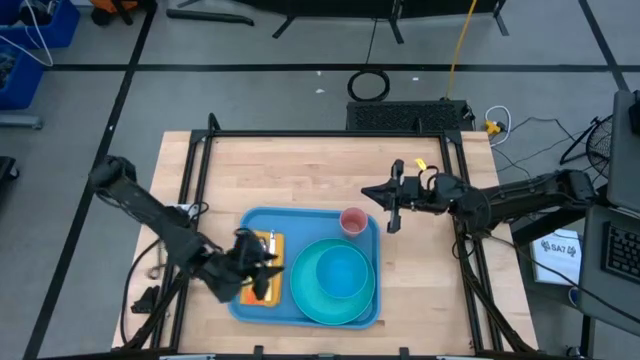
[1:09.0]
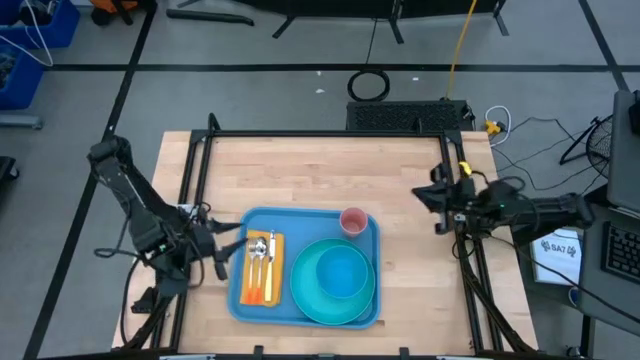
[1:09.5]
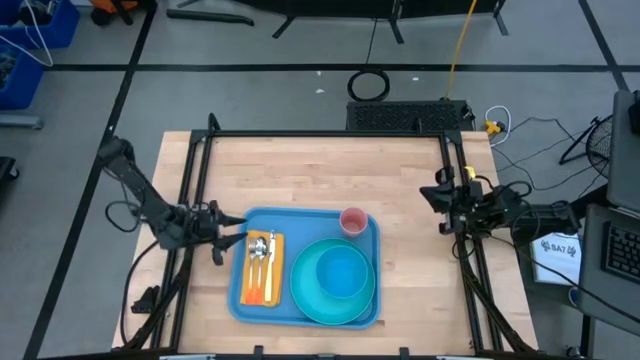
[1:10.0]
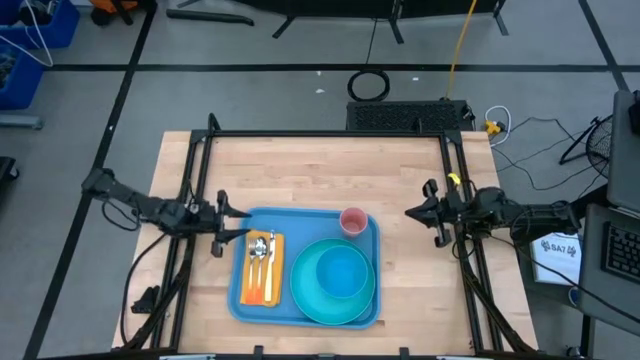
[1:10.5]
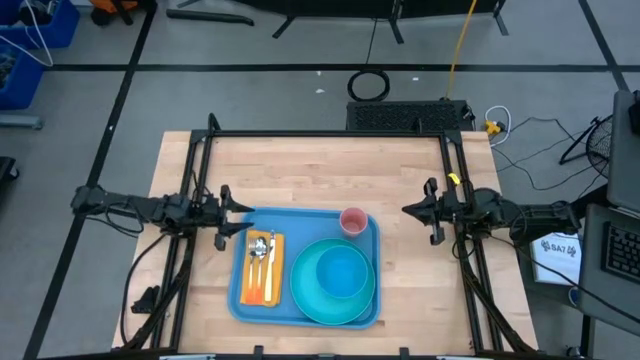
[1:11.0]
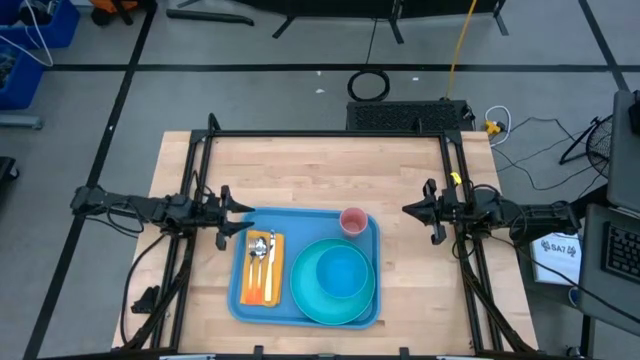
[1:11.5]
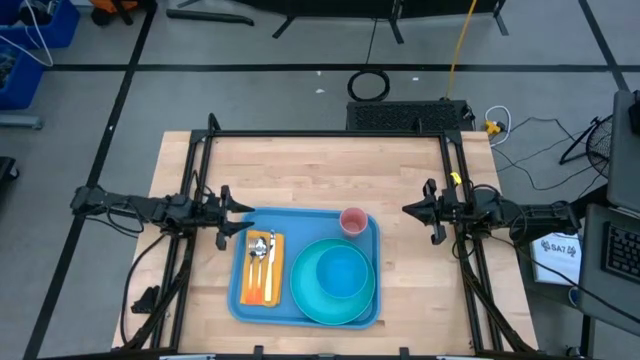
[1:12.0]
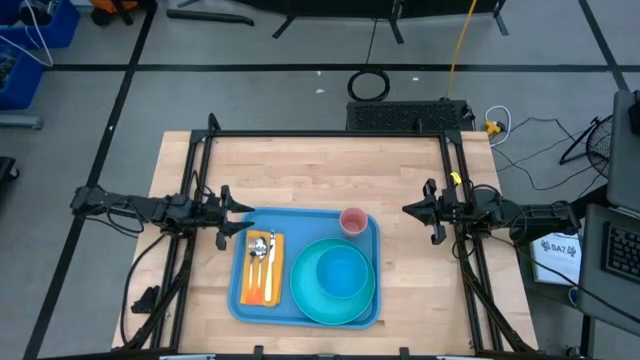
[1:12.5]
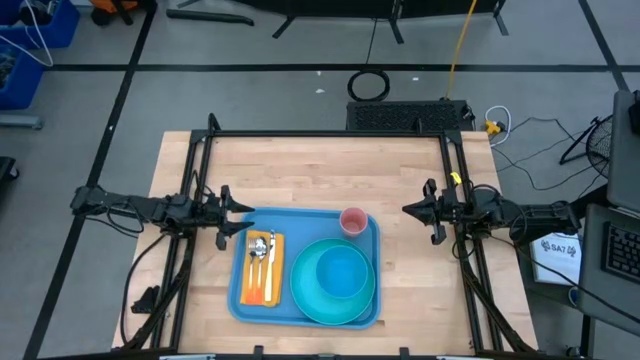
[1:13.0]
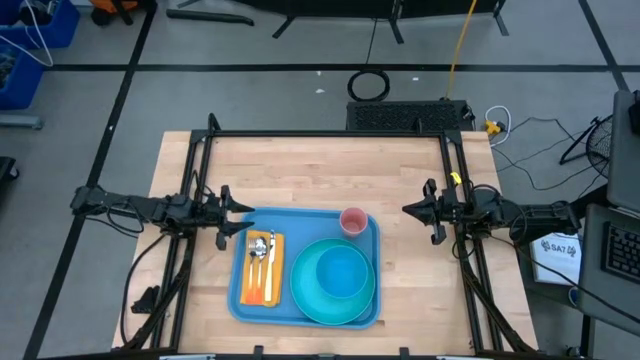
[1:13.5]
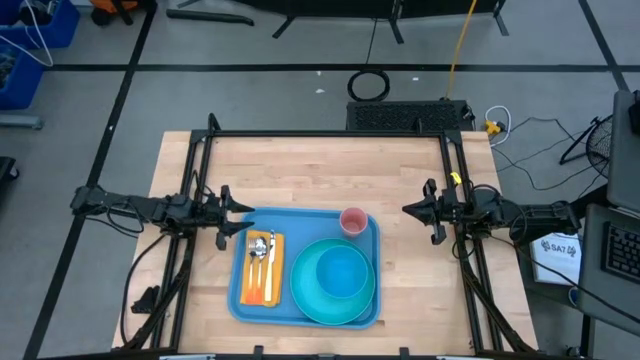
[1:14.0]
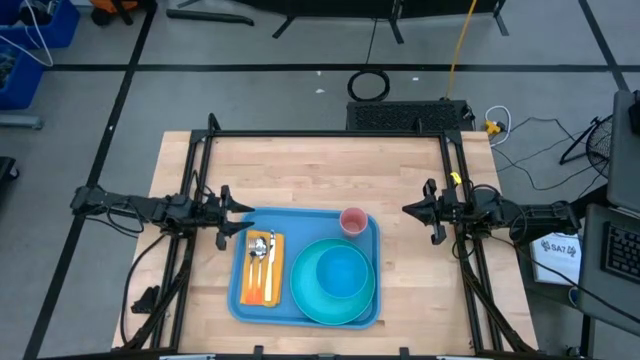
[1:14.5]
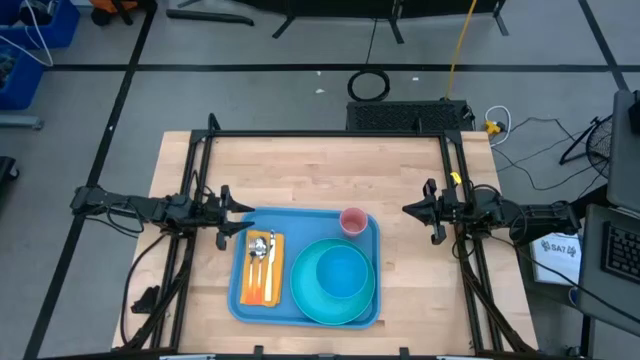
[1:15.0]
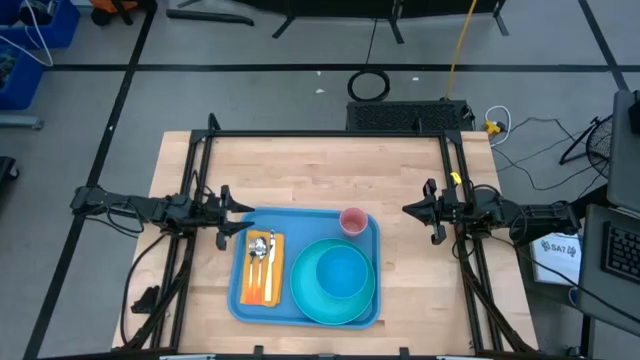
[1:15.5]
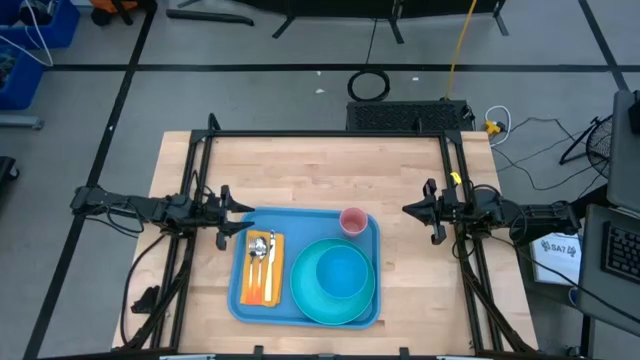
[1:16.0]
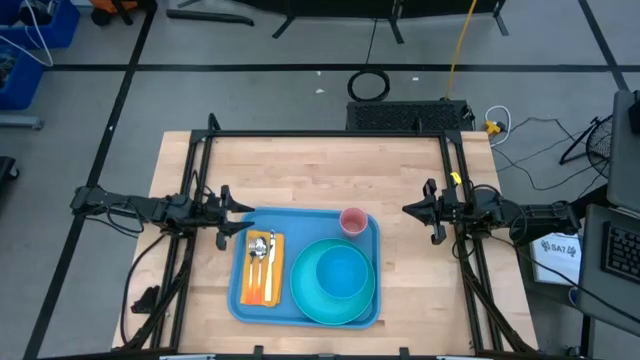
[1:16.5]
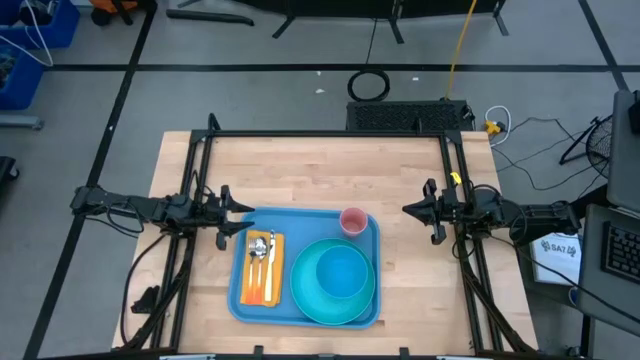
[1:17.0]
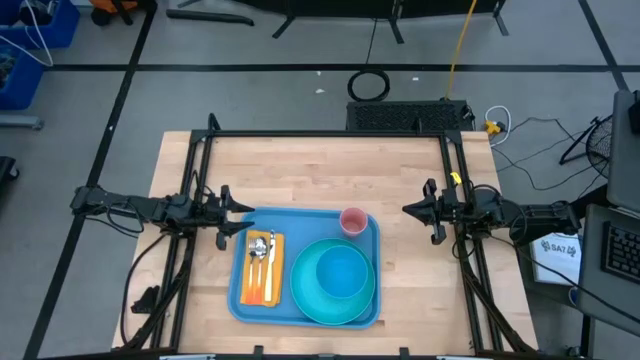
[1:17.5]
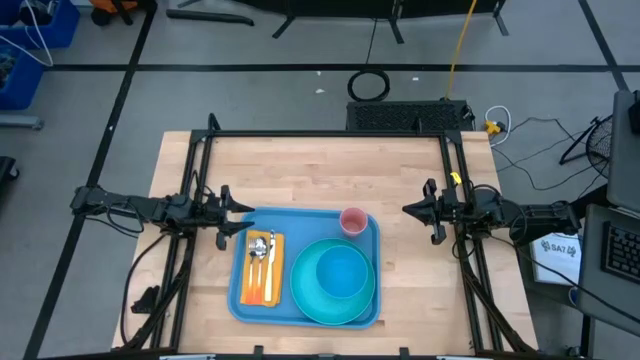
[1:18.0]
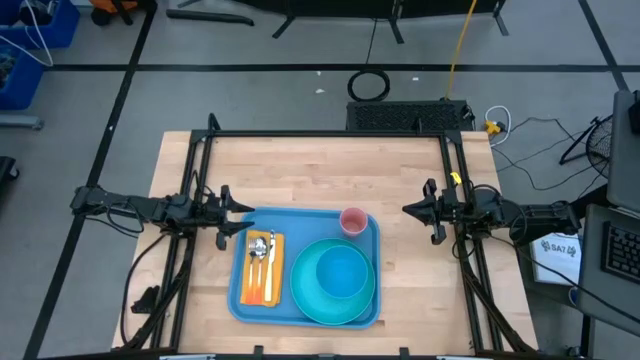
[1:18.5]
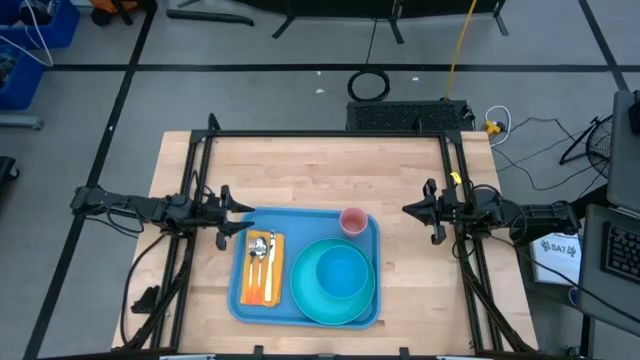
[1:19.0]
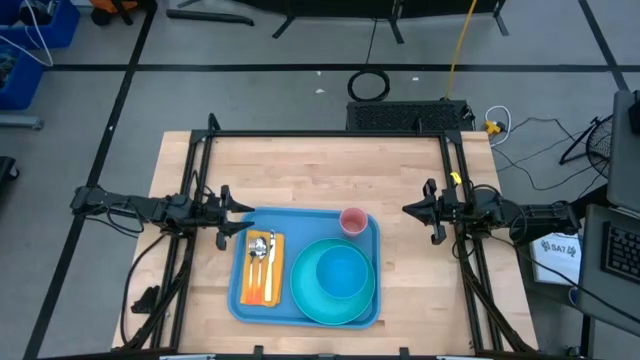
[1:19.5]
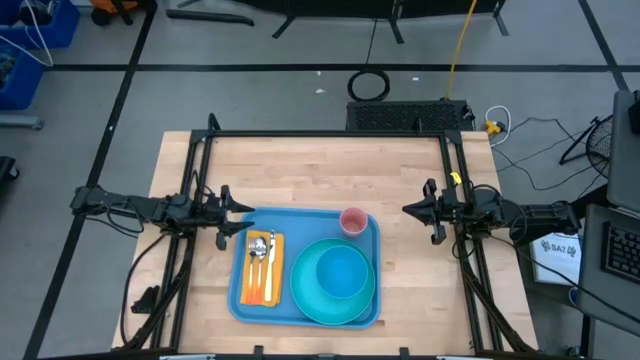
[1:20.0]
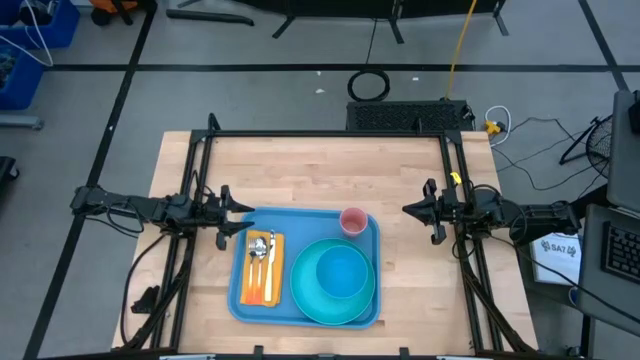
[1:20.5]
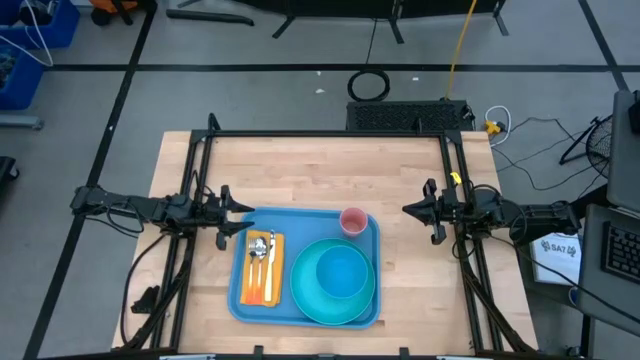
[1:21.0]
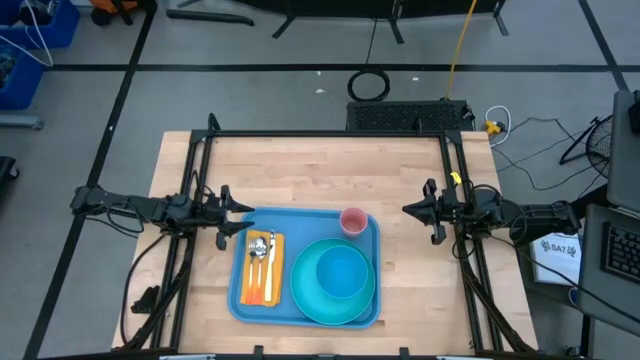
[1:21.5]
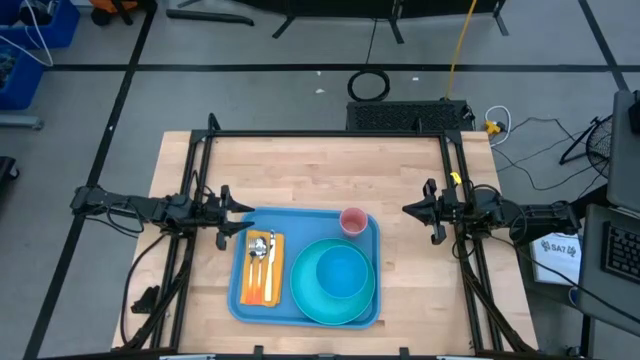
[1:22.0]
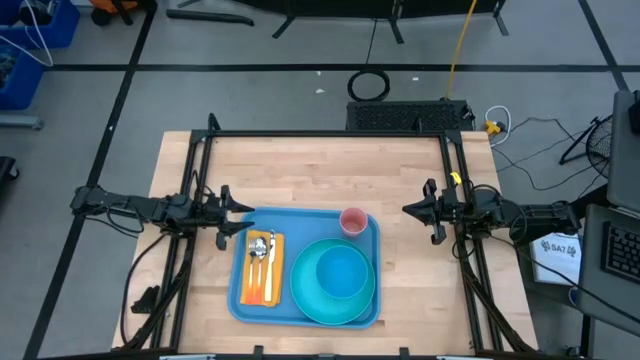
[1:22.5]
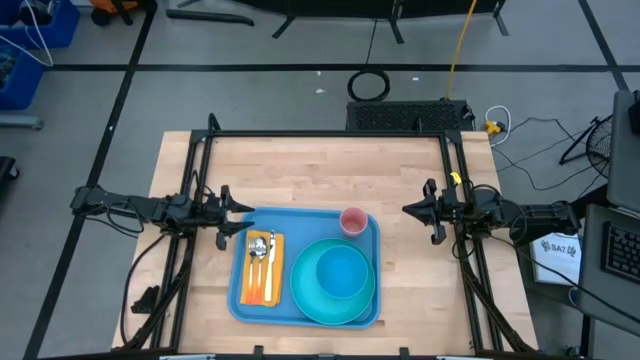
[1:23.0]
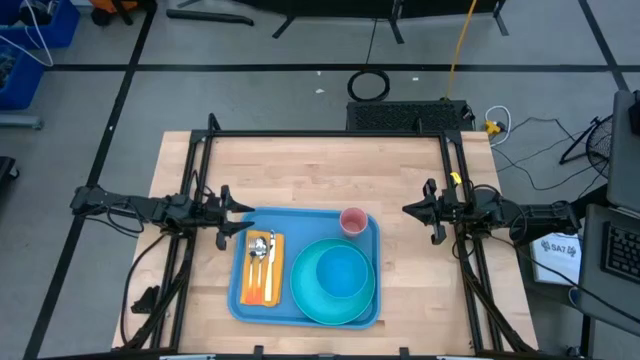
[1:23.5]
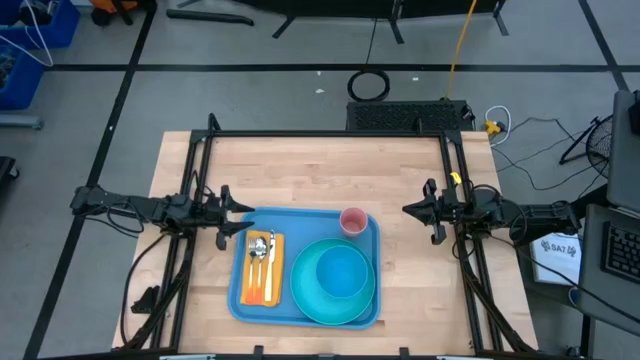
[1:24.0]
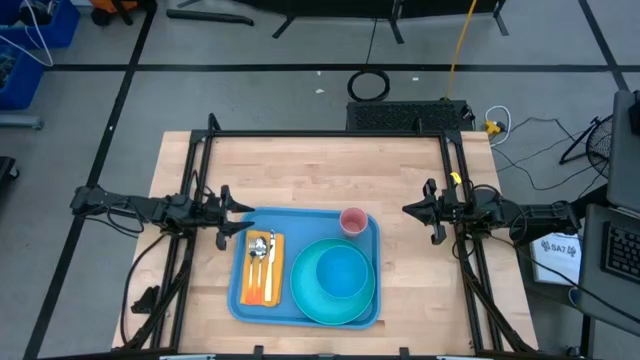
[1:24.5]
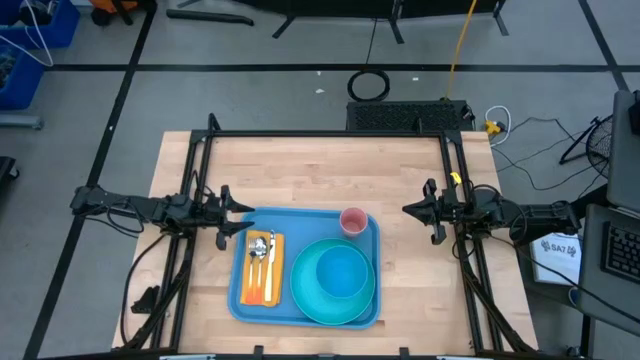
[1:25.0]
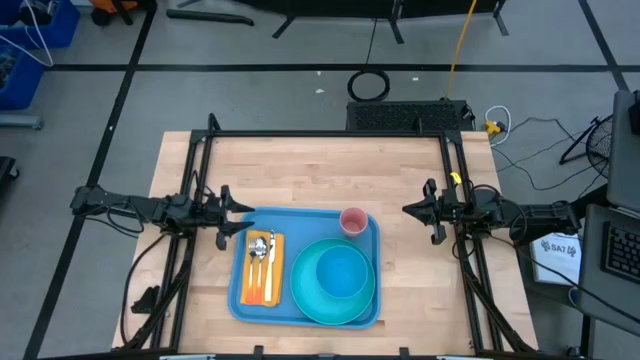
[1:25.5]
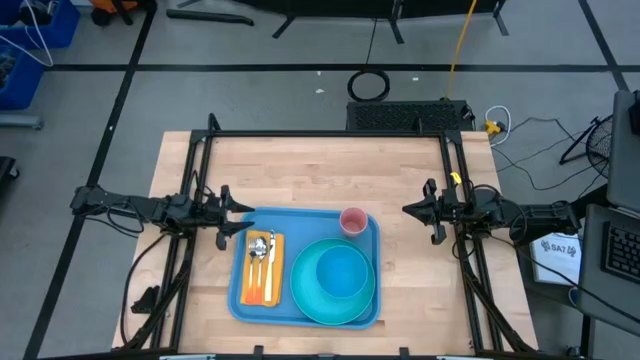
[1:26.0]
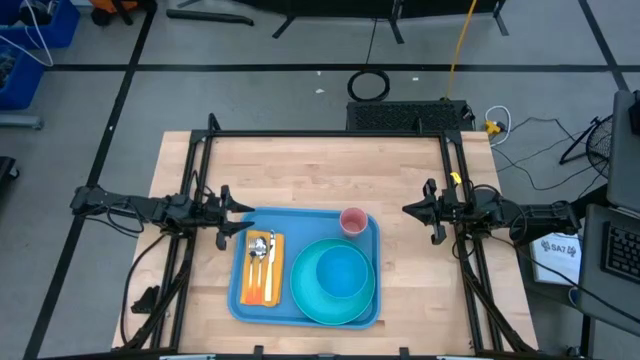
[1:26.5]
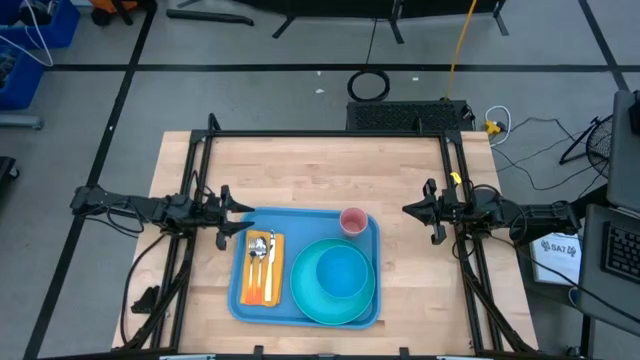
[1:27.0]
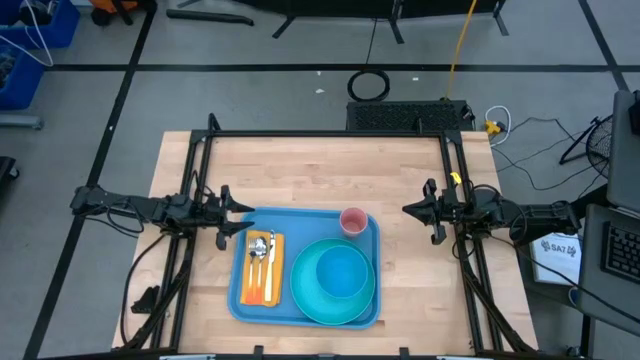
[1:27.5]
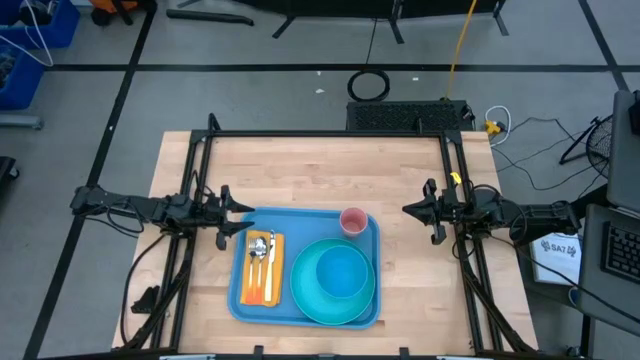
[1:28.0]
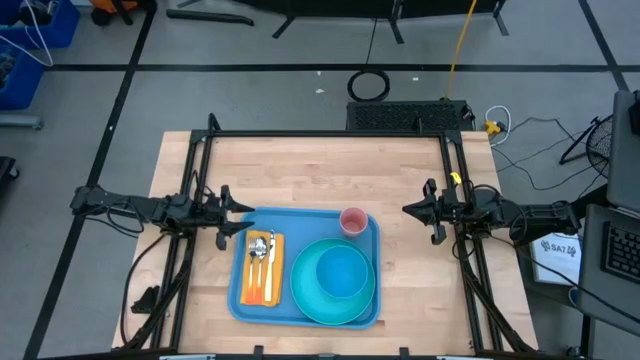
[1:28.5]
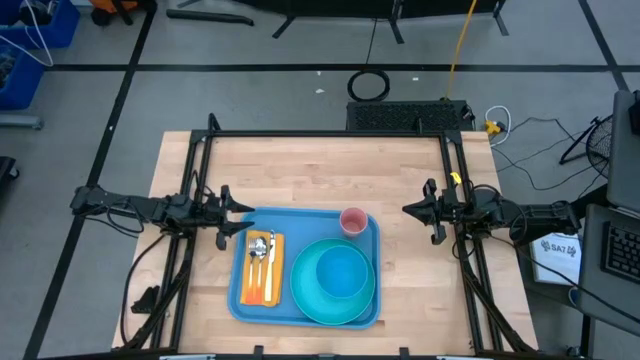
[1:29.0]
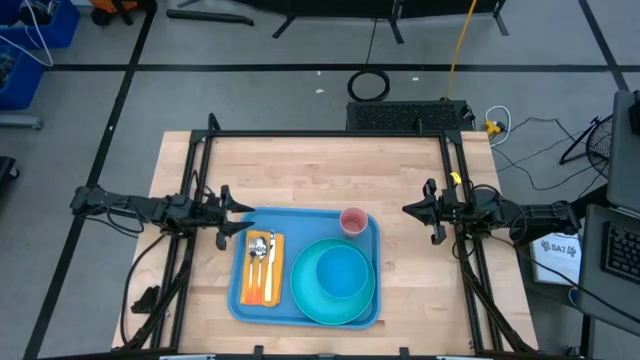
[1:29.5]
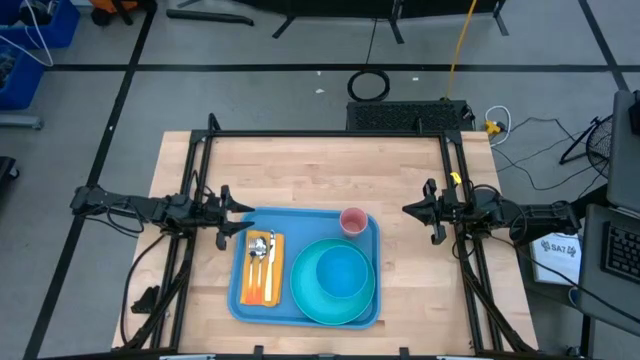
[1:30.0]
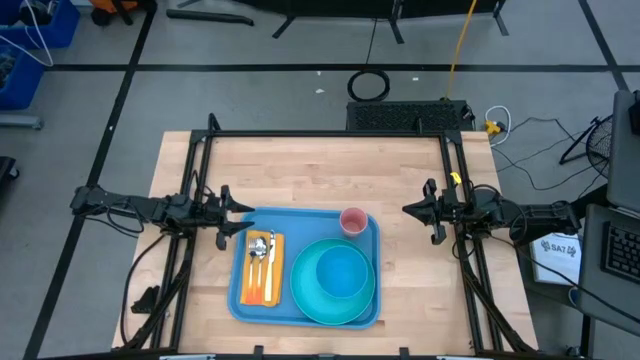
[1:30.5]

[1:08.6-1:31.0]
Task: Set up tray
Return to Home Position
